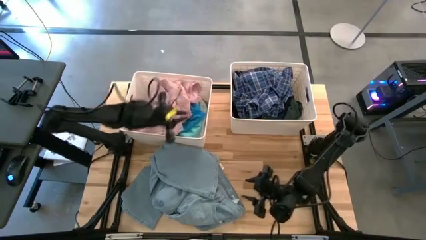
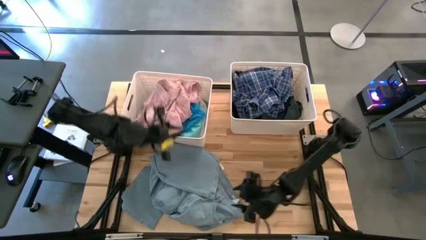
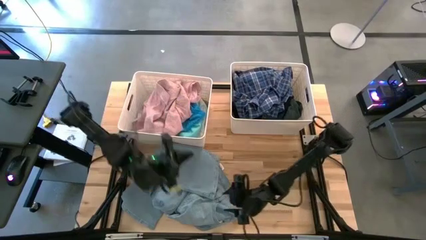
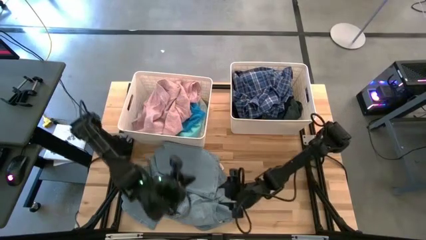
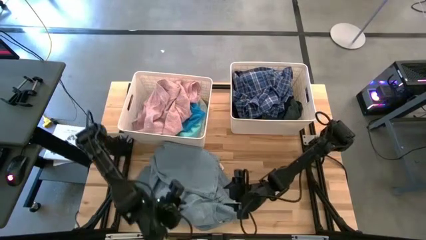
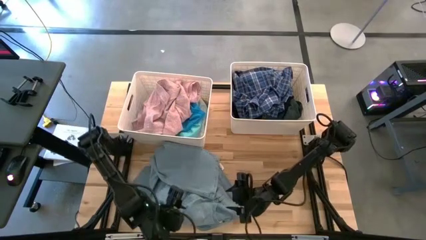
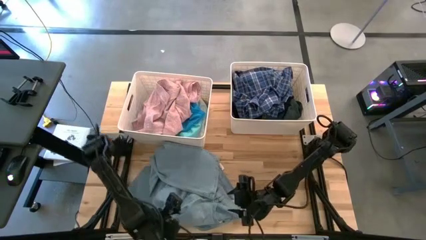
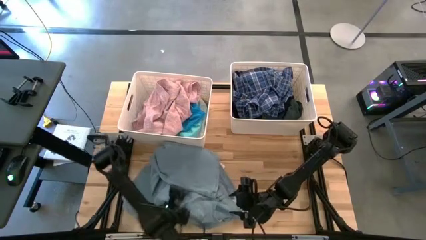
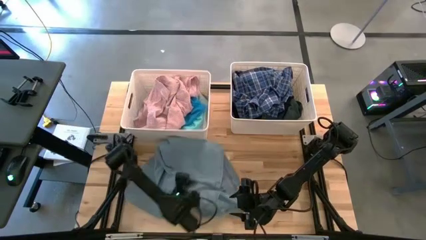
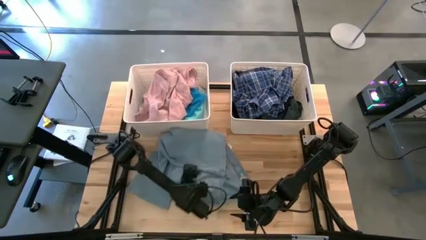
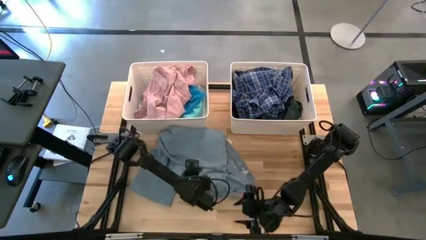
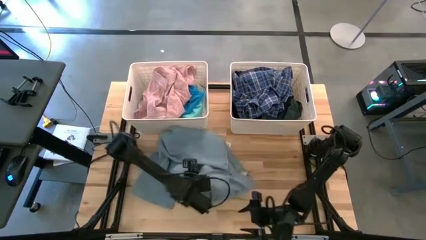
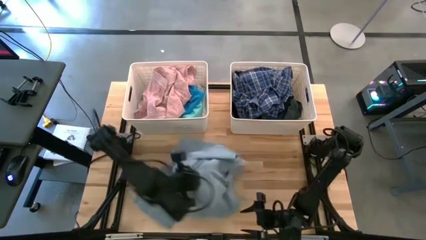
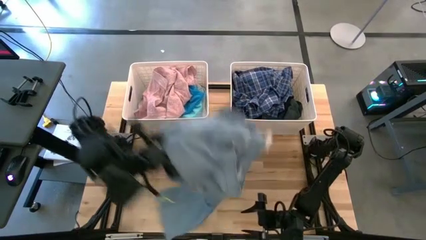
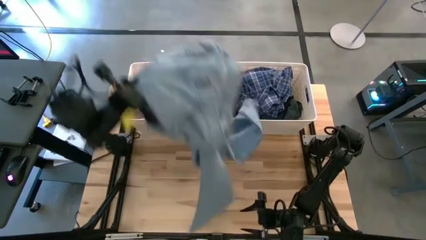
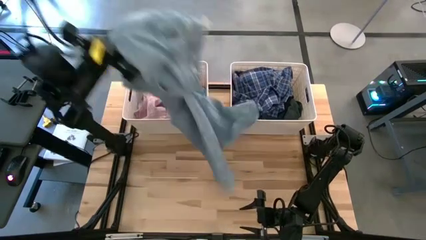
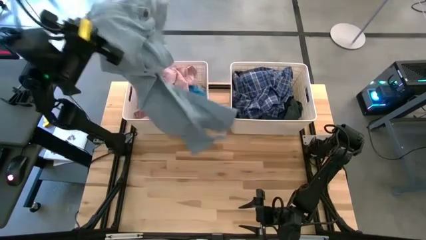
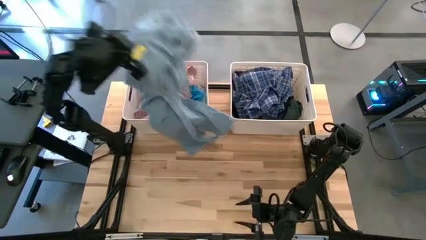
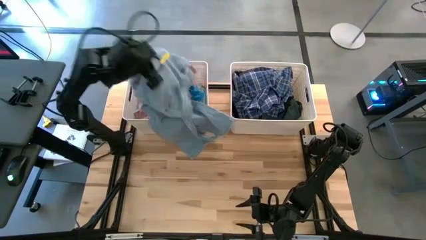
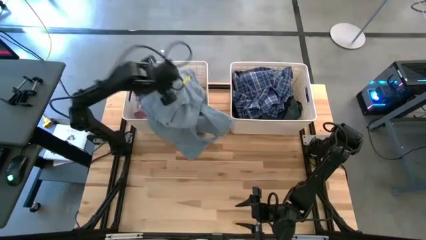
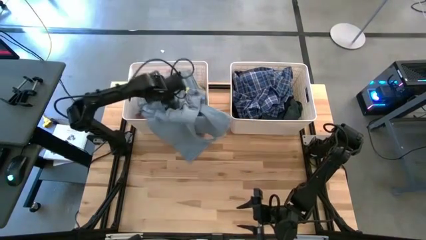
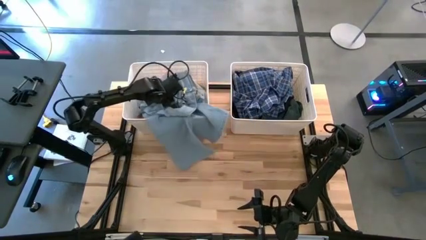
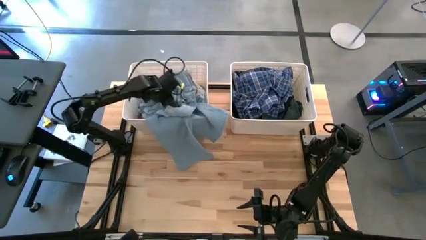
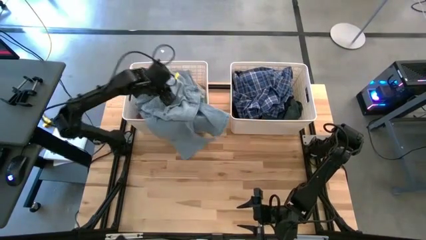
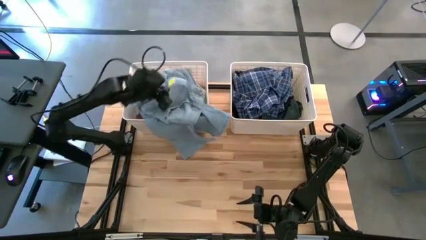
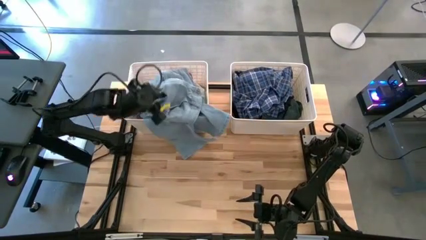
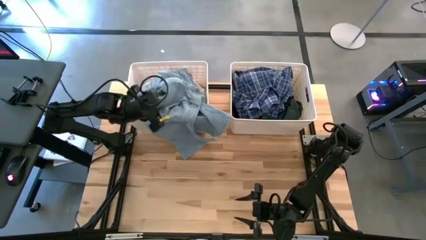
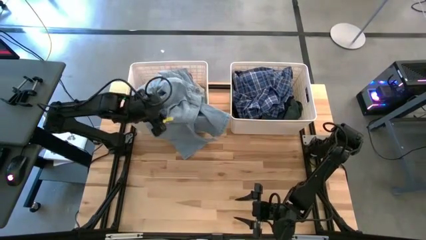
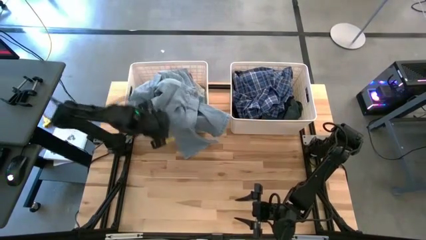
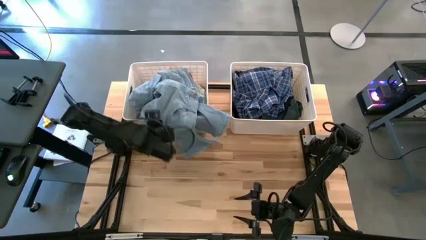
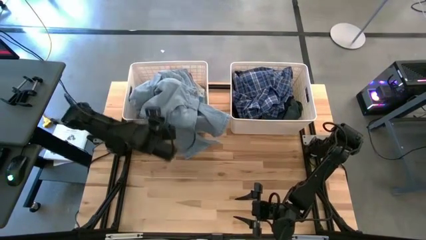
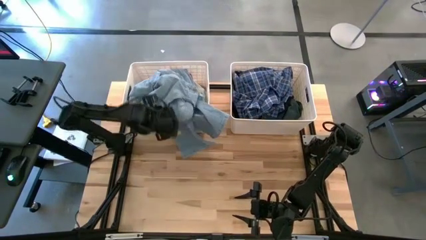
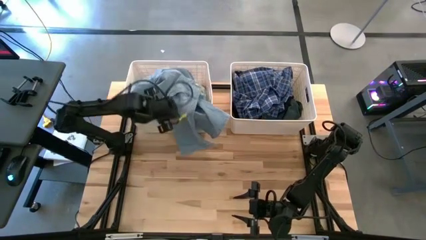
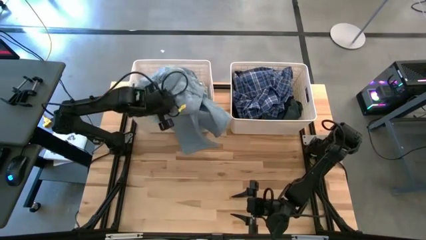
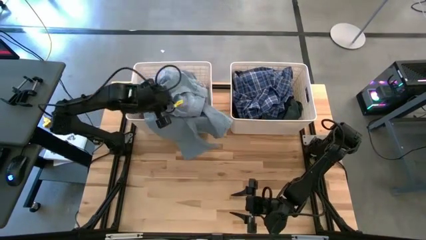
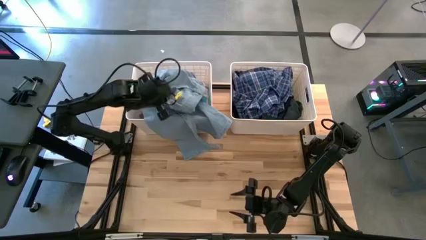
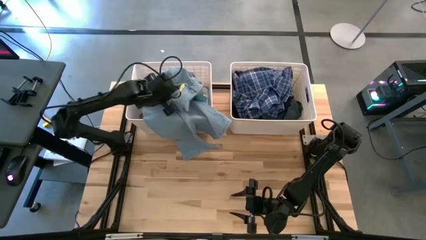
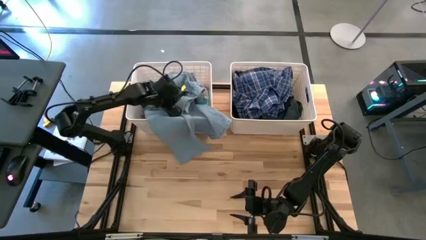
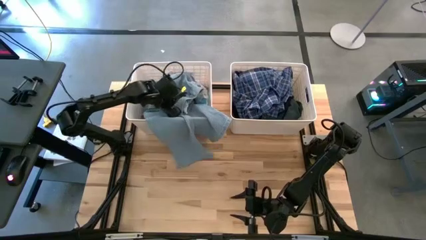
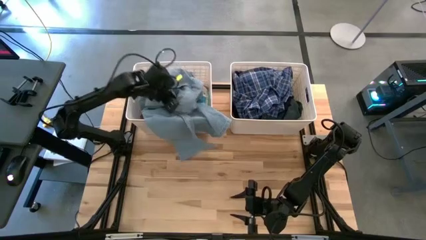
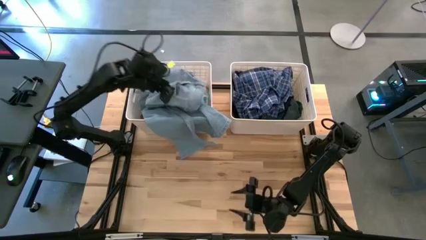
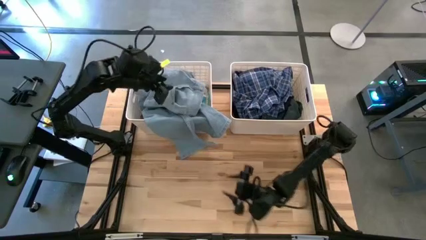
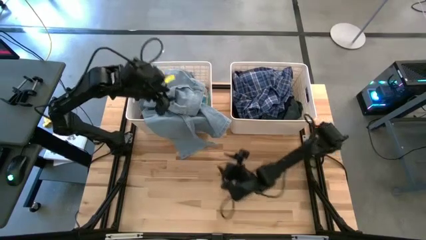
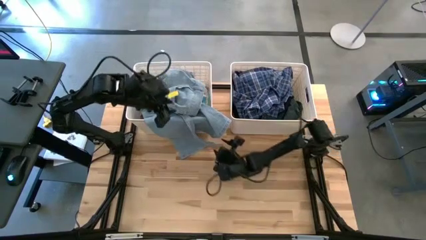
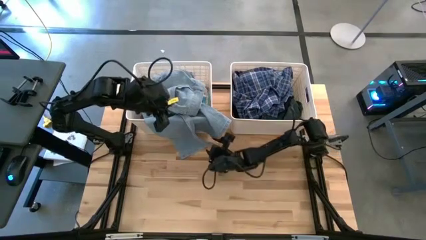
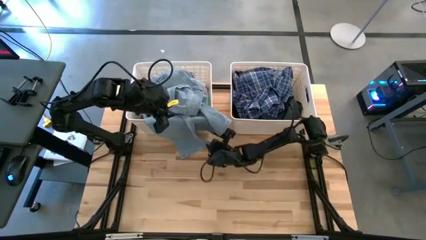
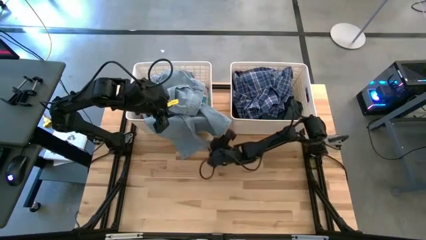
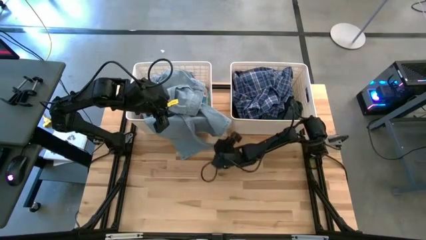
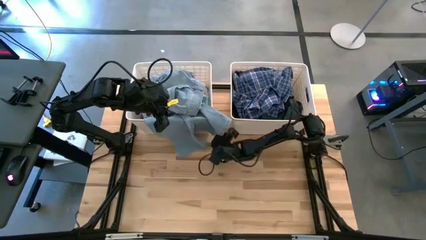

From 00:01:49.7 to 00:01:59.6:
Task: Sort clothes
Put the light blue denim pants into the left white bin

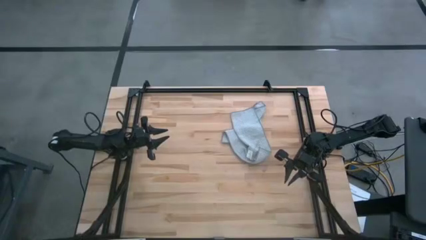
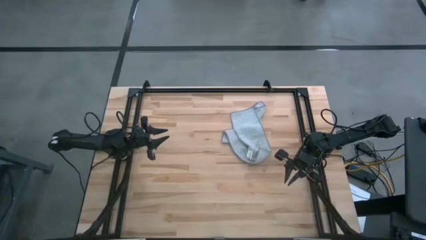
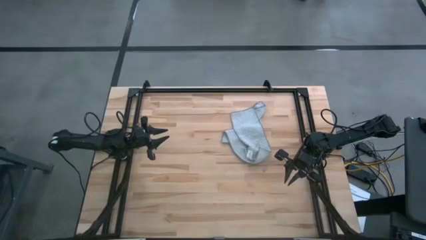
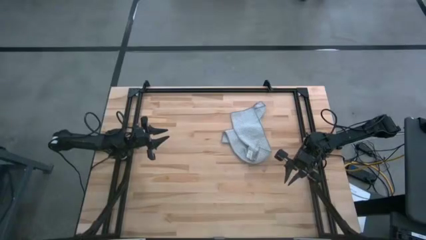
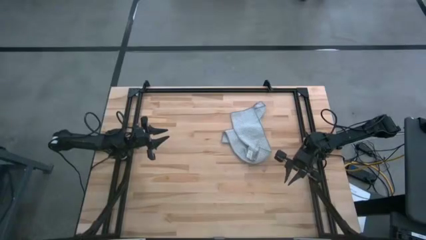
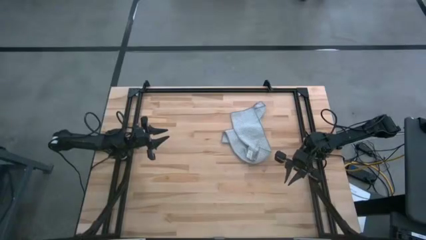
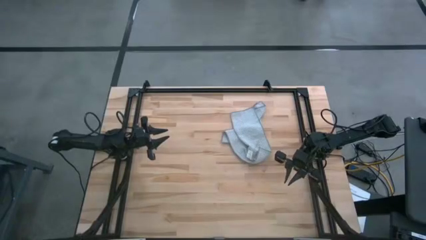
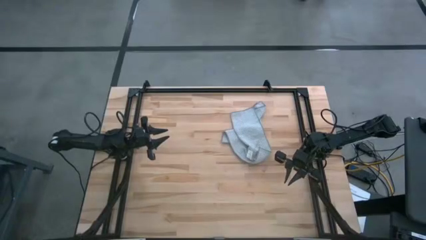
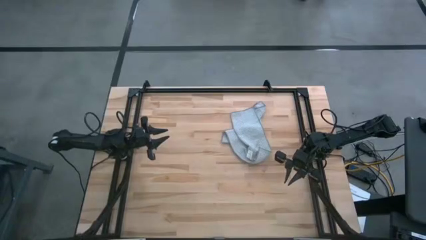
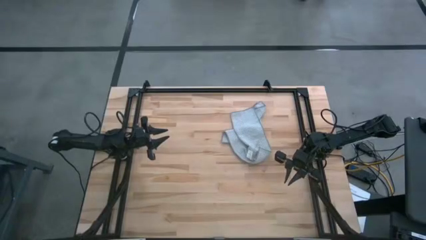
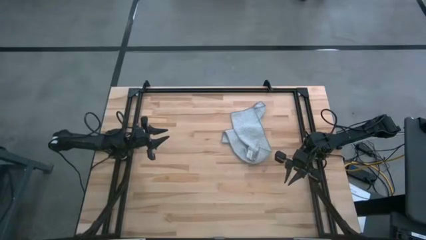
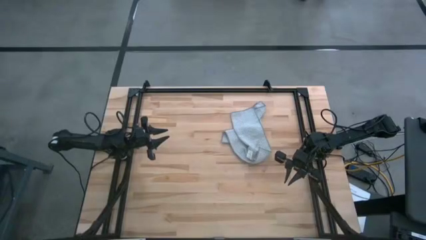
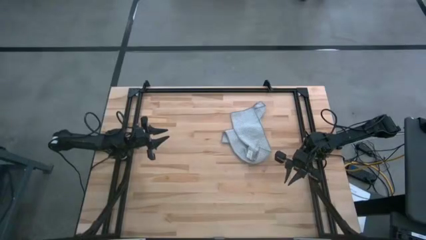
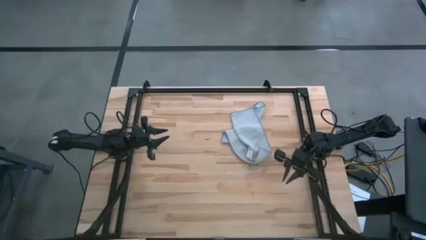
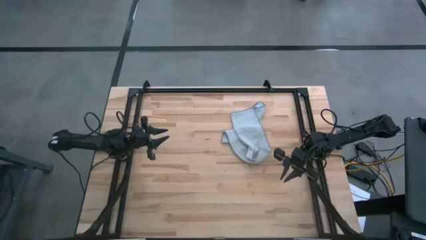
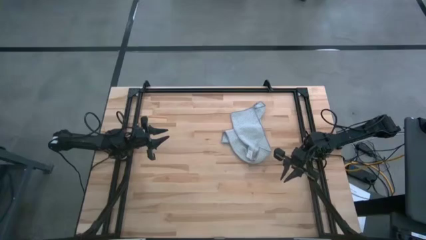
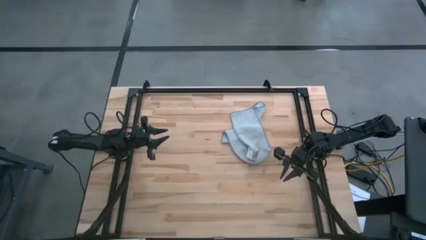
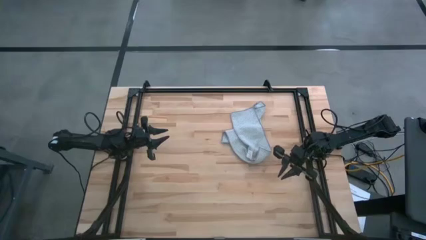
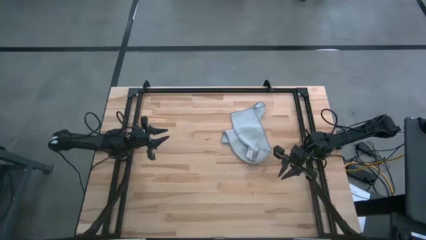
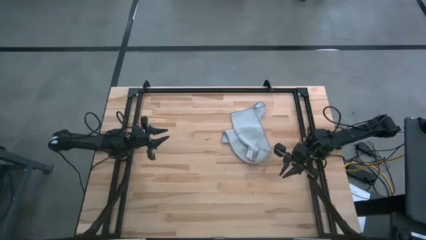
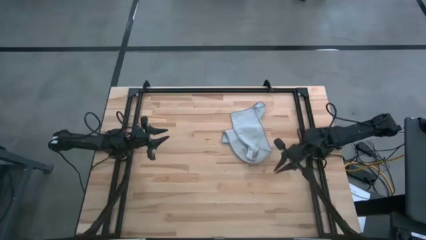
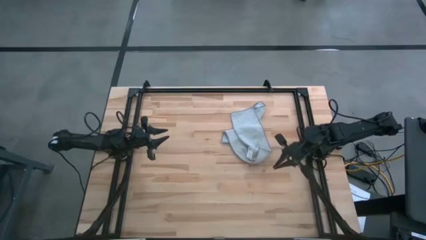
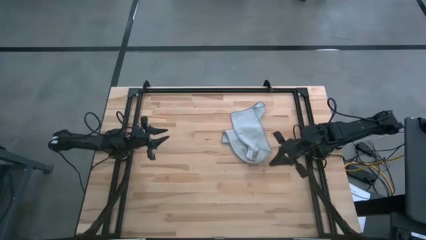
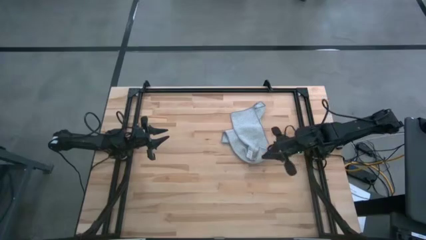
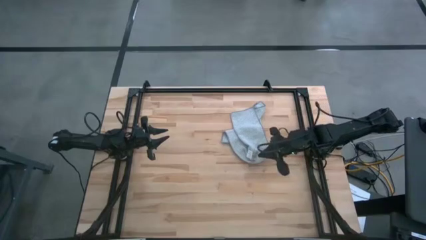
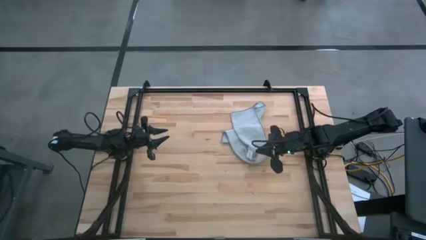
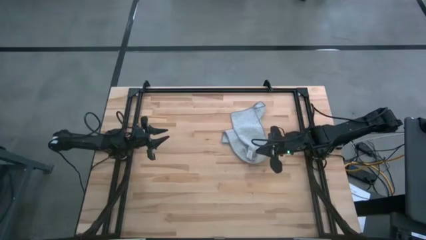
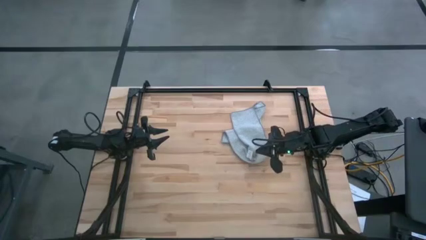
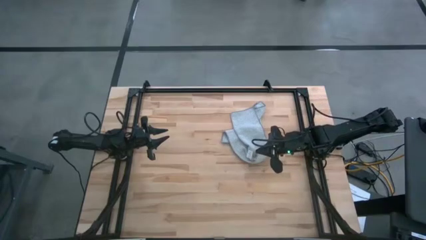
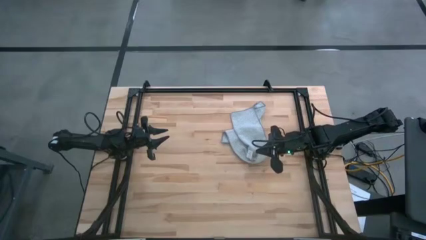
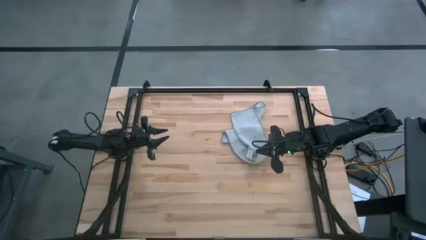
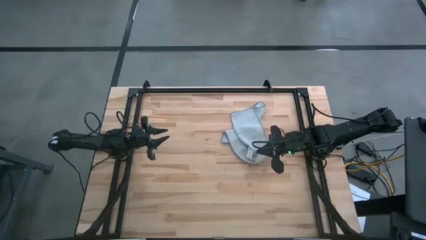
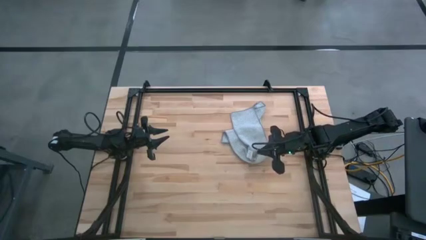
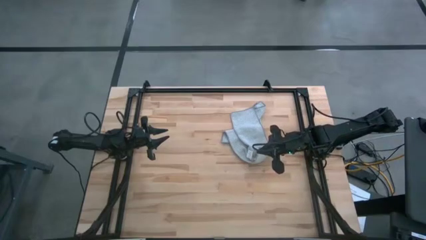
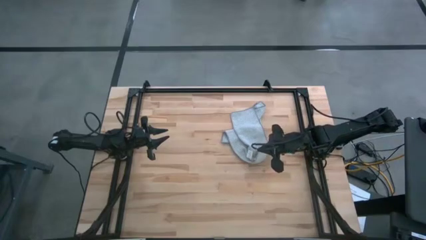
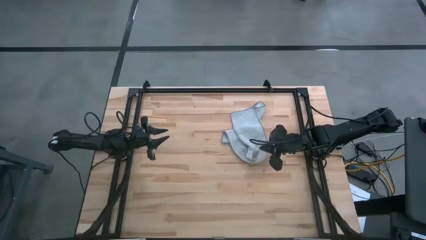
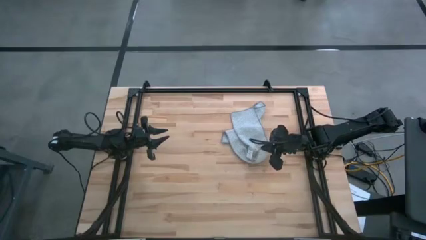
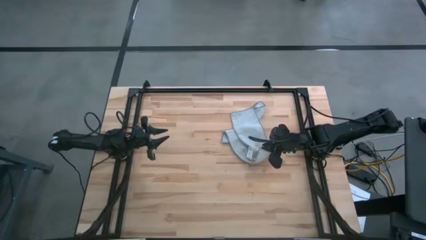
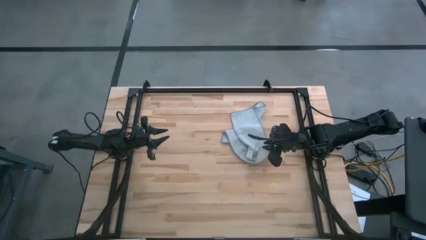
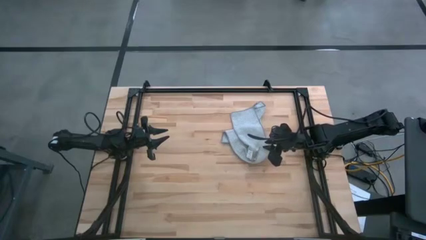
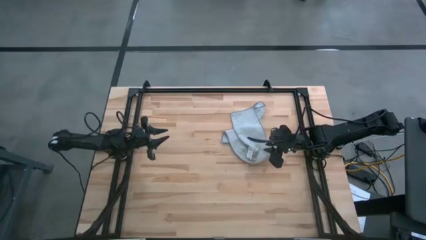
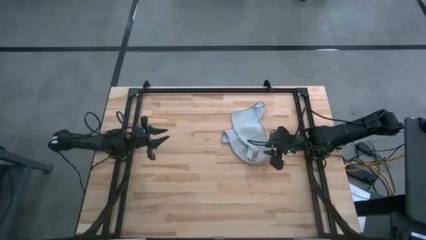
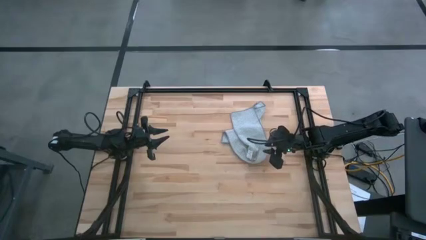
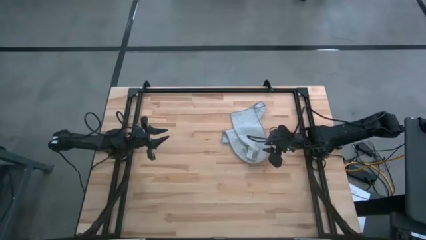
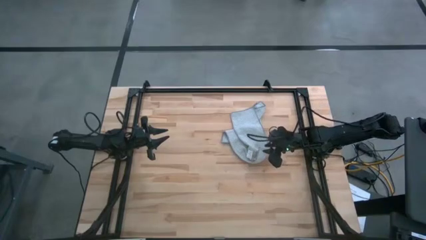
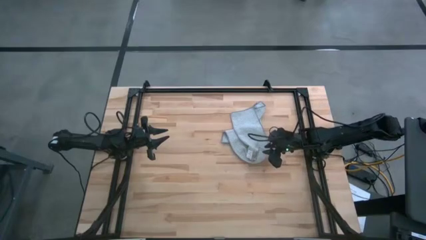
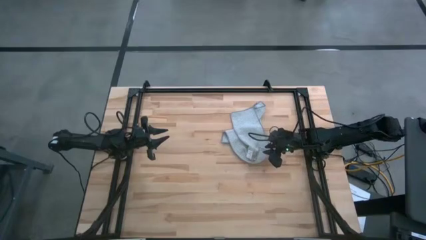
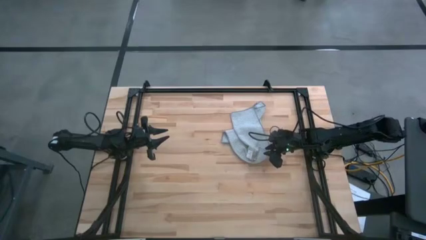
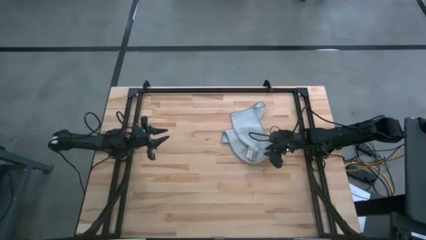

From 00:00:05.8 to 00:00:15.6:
Task: Fold microfiber towels
Fold the gray on the table
